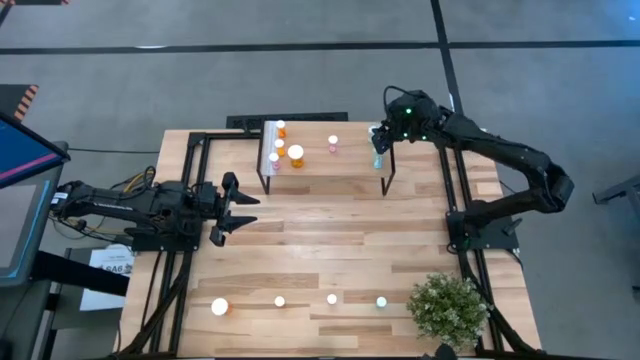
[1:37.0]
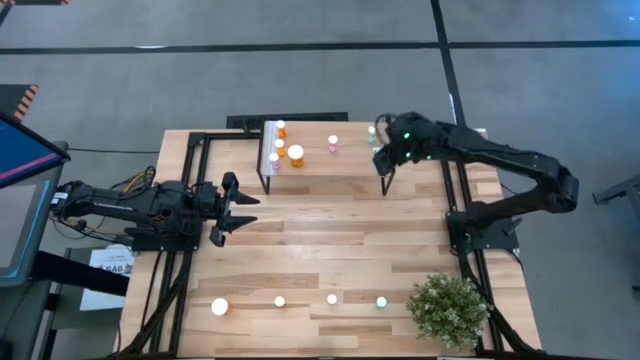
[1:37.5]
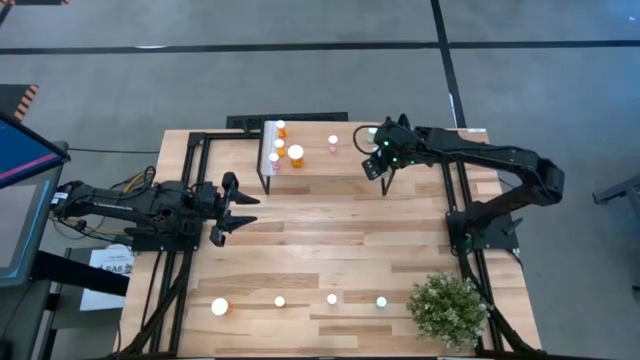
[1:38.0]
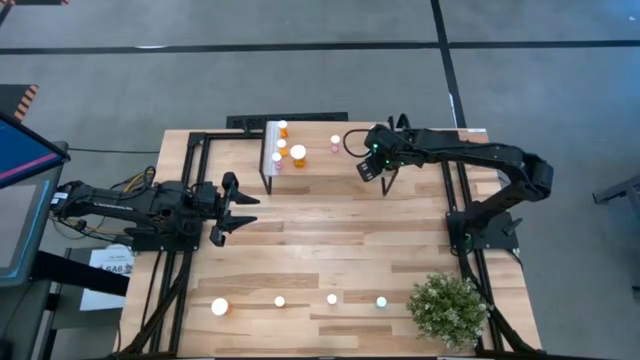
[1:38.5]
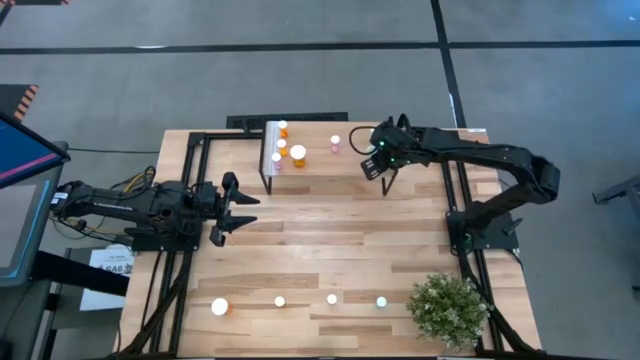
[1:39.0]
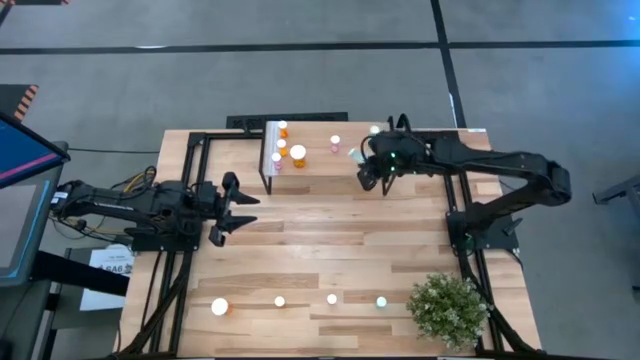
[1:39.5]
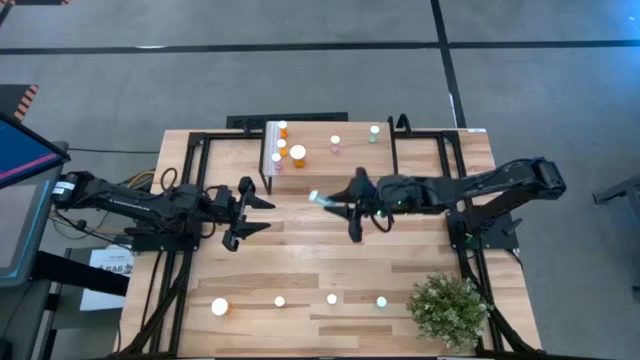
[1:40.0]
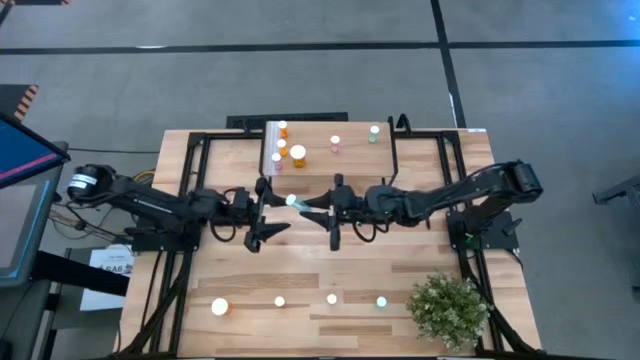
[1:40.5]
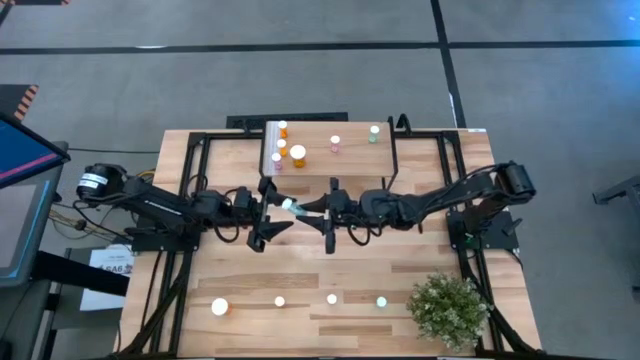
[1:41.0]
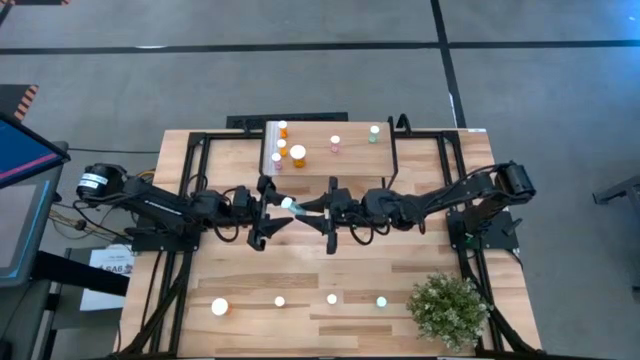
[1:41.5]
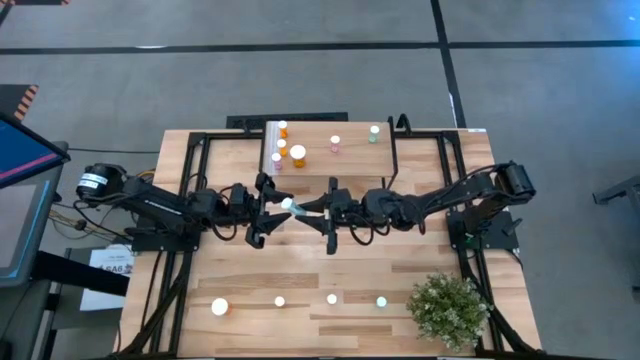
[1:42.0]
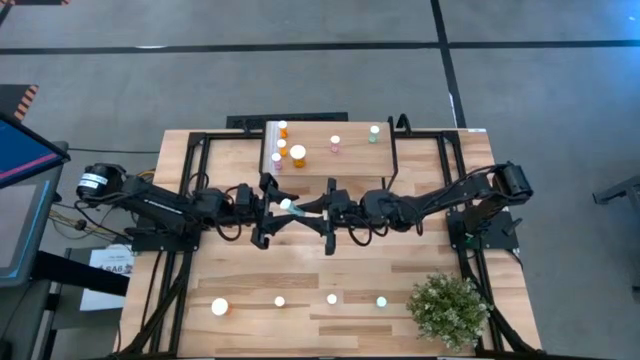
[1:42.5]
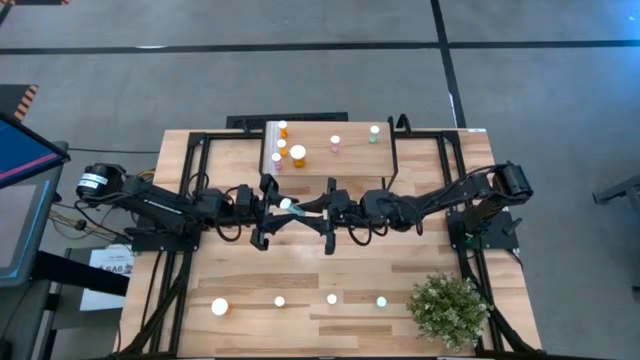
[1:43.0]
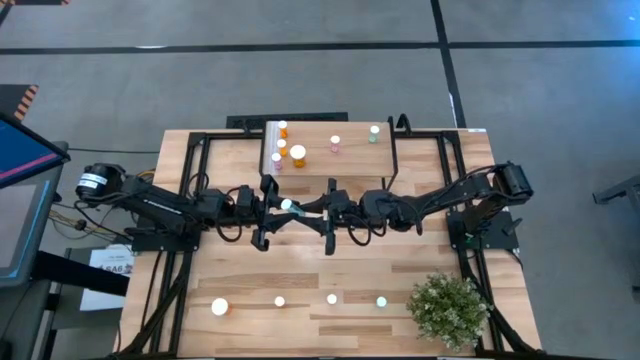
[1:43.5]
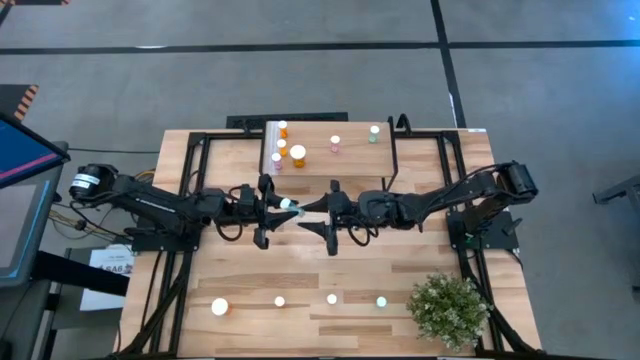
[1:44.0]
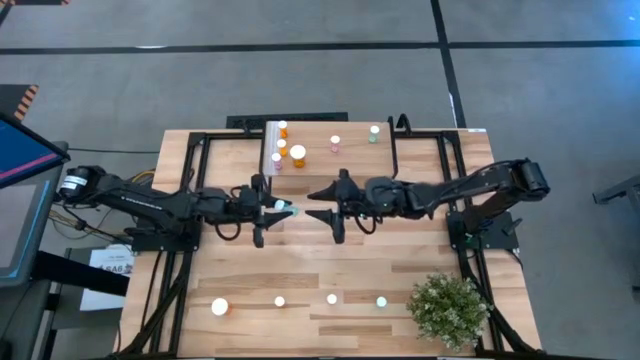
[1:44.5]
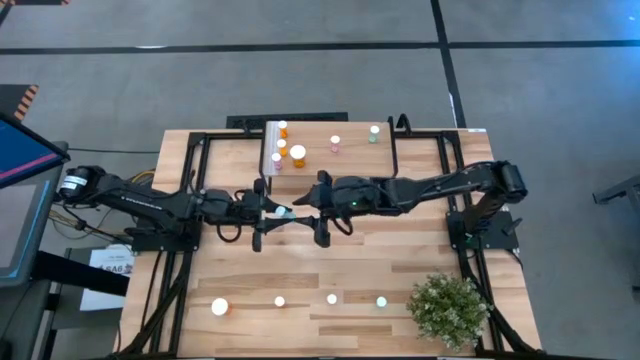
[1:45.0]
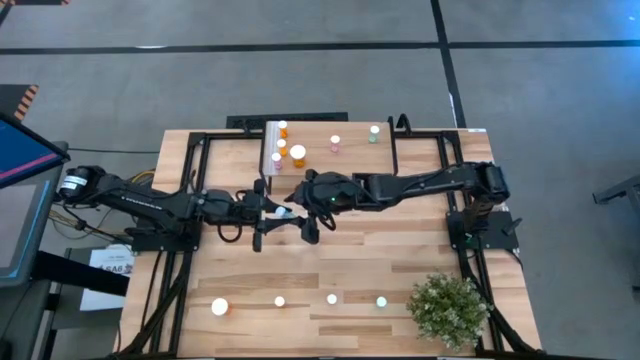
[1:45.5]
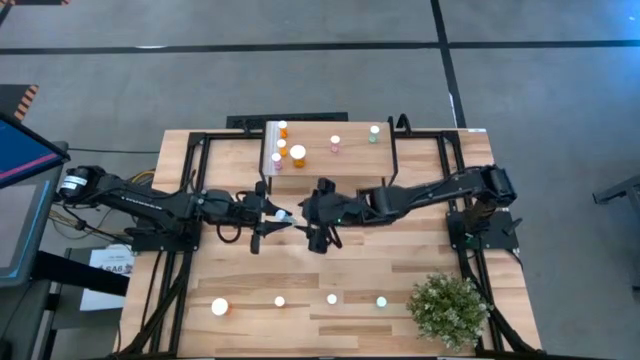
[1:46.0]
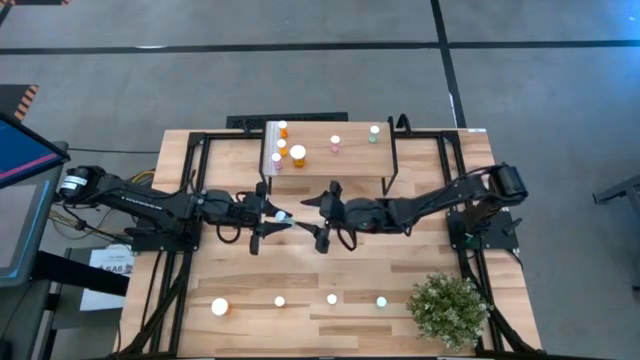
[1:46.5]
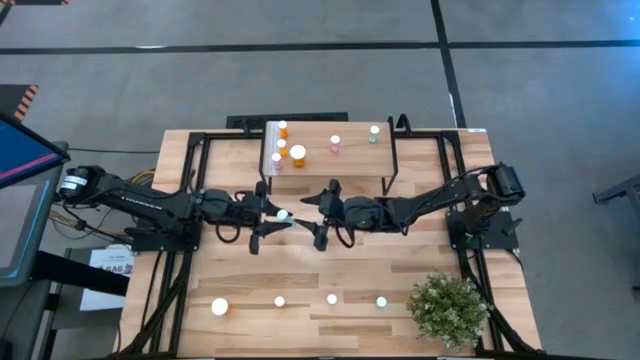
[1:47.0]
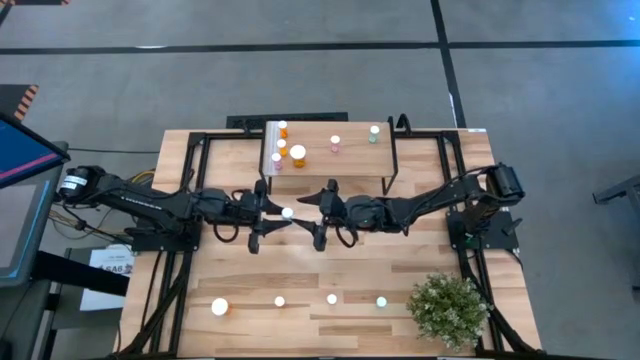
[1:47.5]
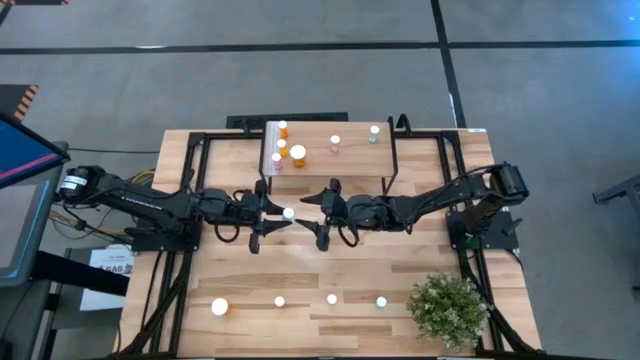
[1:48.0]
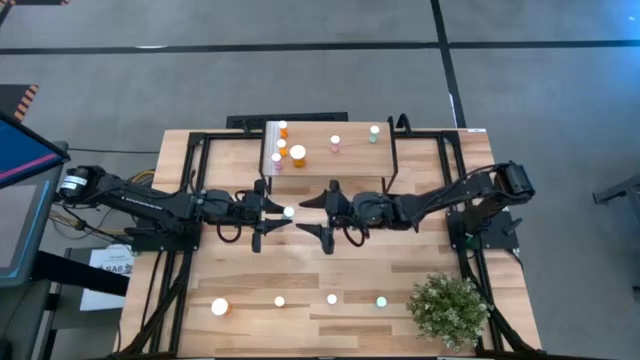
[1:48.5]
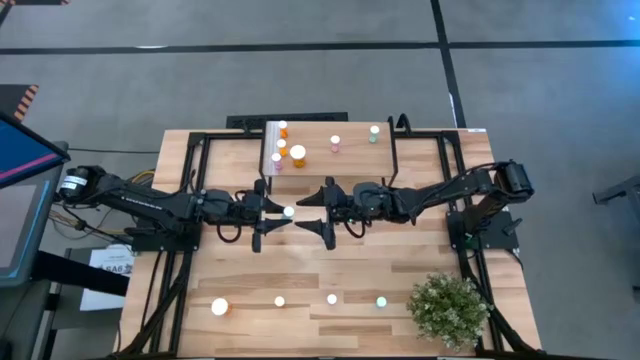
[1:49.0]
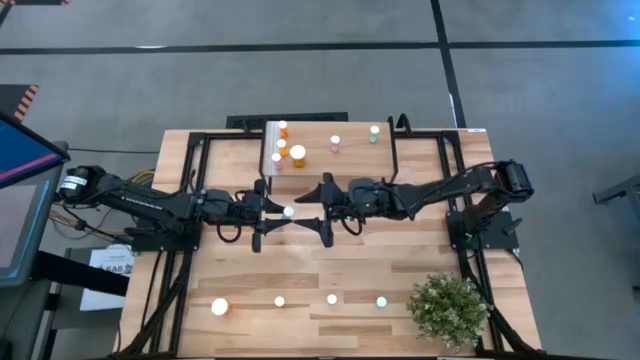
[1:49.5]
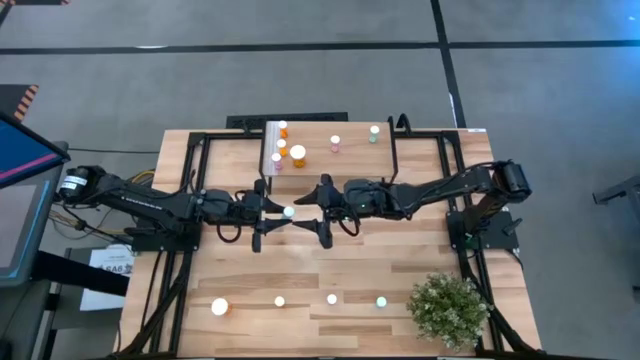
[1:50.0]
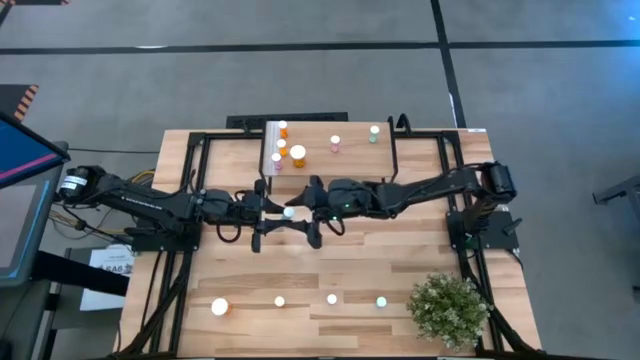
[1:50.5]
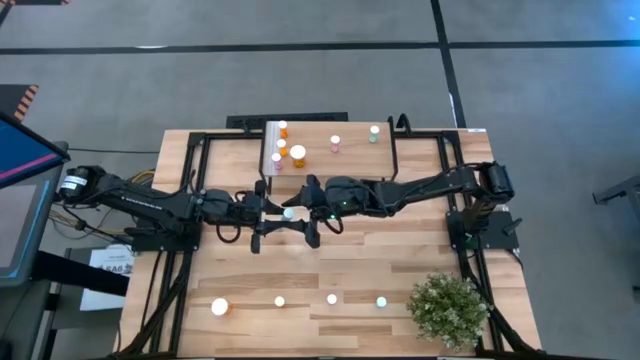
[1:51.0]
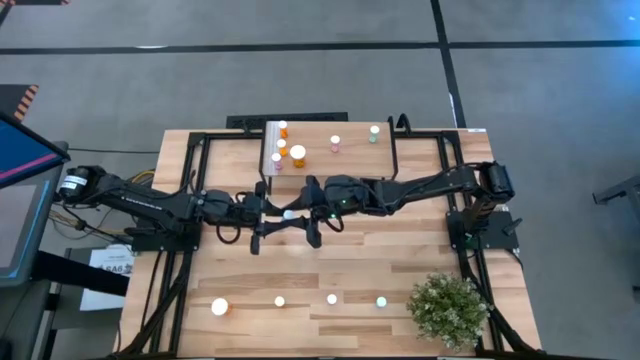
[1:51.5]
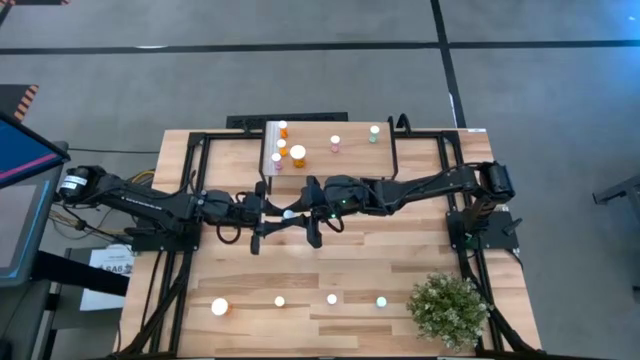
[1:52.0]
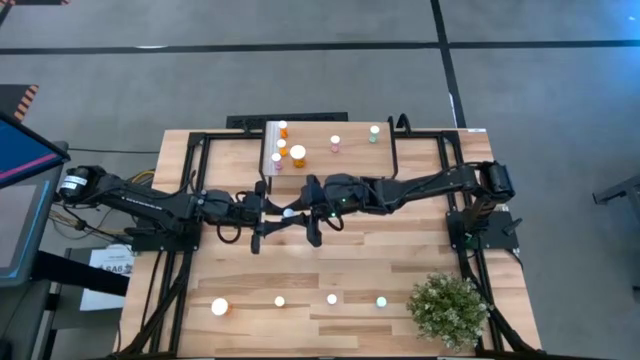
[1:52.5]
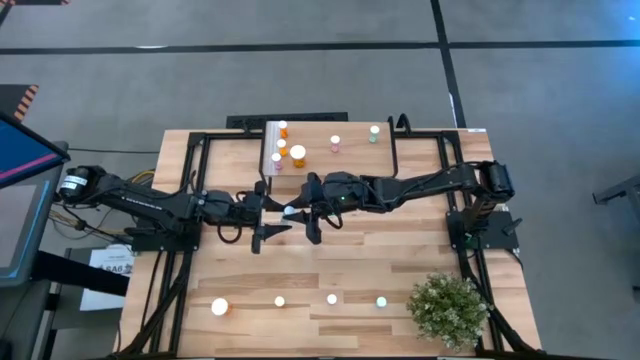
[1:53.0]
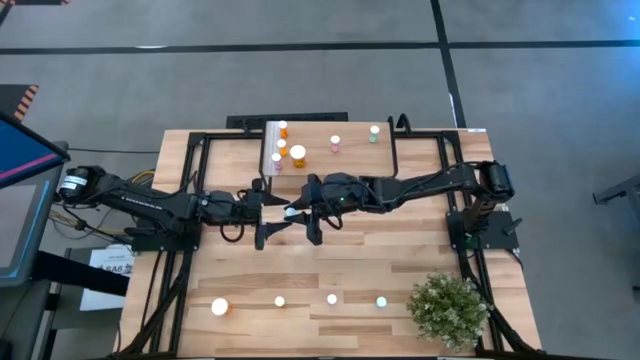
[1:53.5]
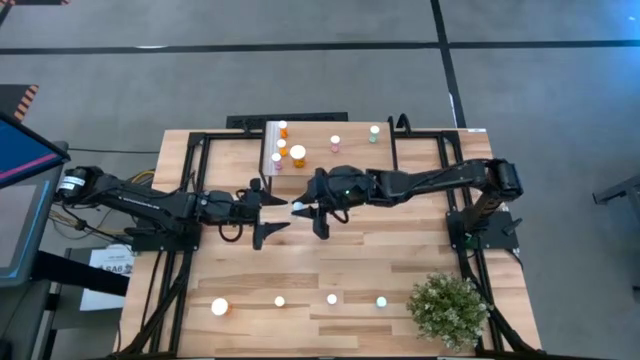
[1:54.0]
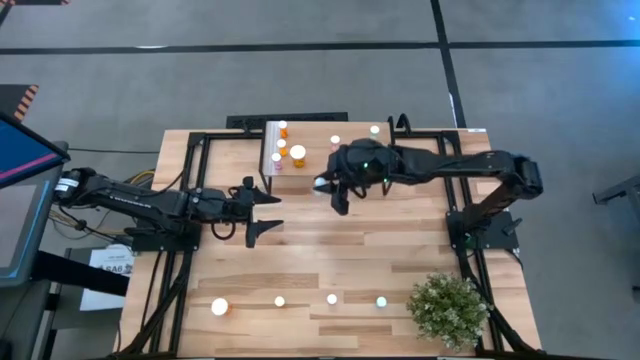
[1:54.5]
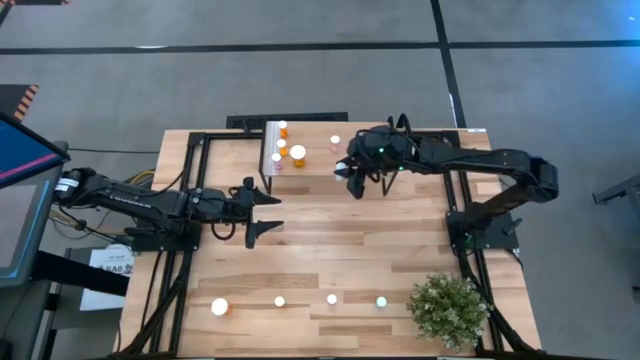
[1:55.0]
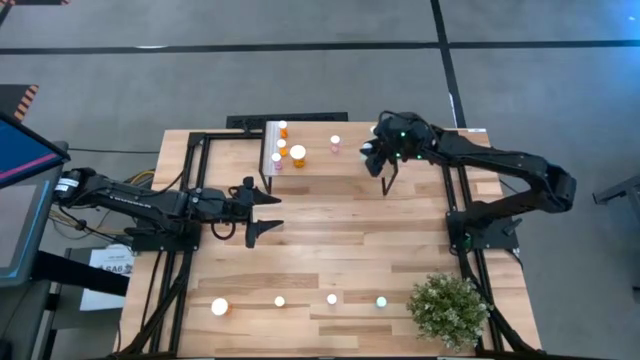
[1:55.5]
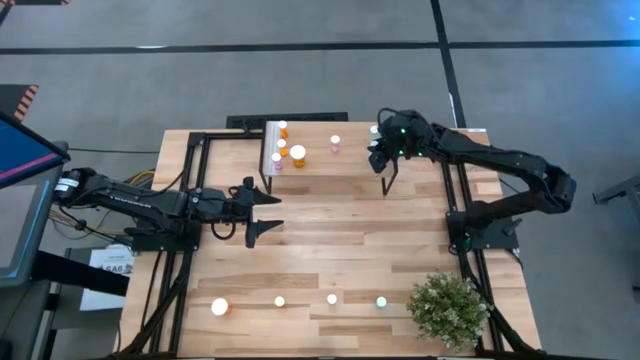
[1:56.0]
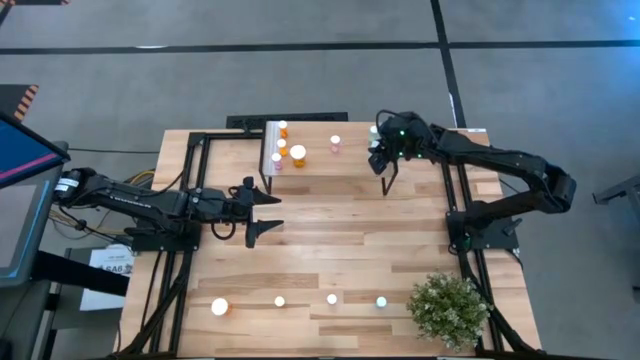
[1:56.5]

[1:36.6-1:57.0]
Task: Pick and place medicine bottles onto shelf by color
Adjust the blue pill bottle on the shelf
